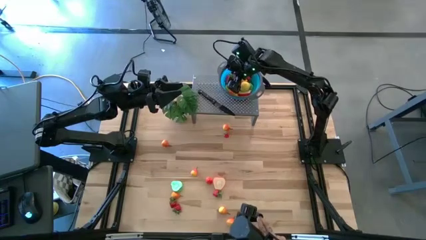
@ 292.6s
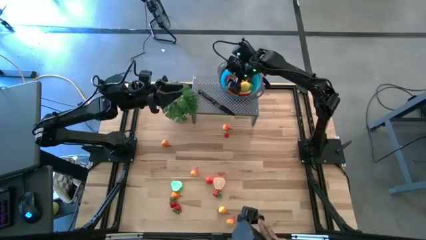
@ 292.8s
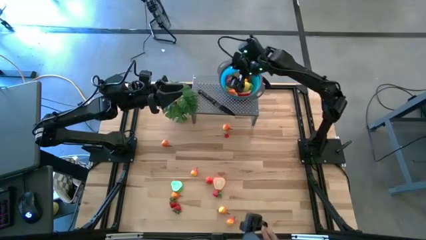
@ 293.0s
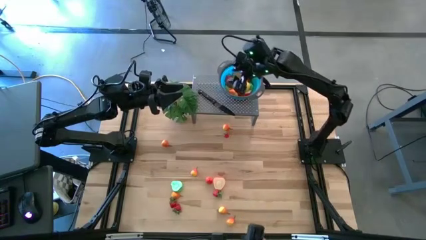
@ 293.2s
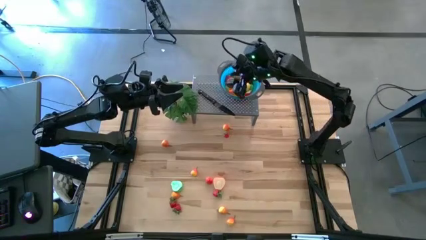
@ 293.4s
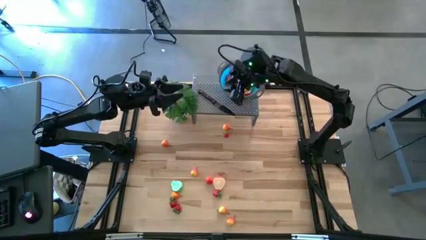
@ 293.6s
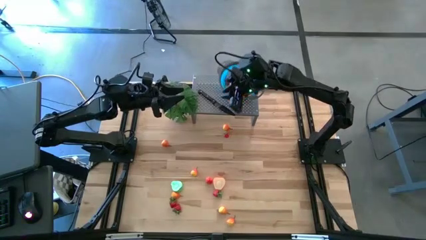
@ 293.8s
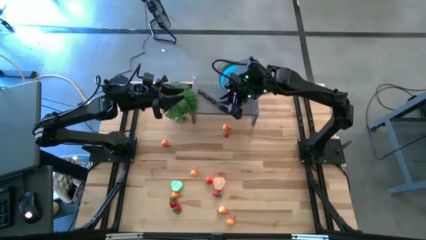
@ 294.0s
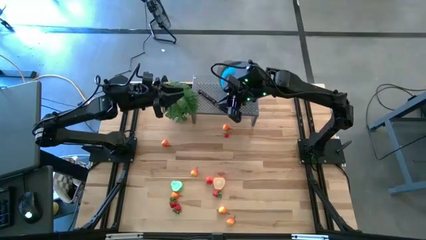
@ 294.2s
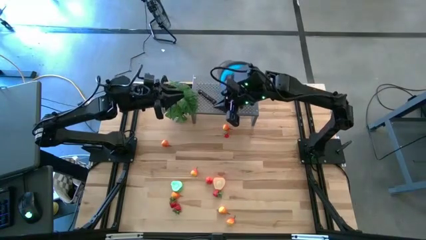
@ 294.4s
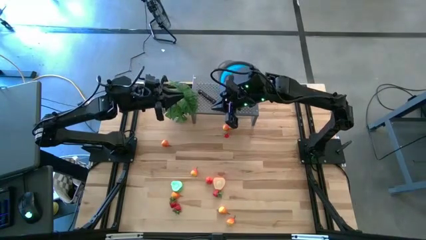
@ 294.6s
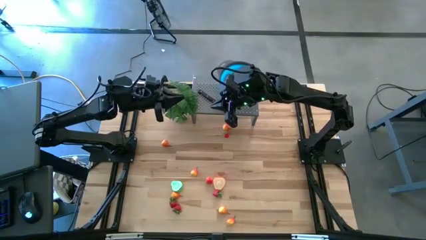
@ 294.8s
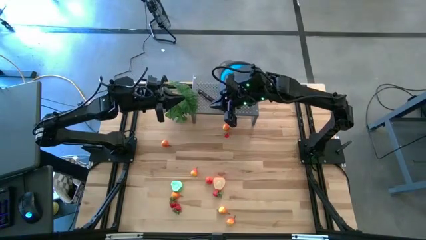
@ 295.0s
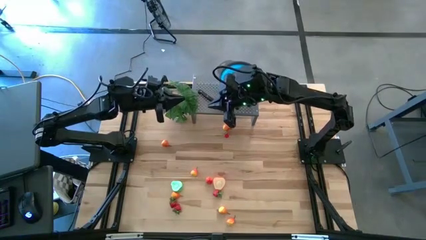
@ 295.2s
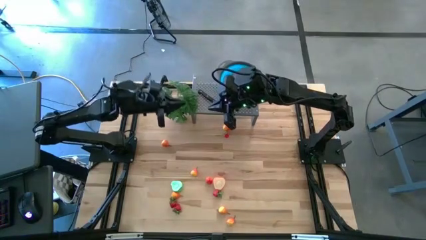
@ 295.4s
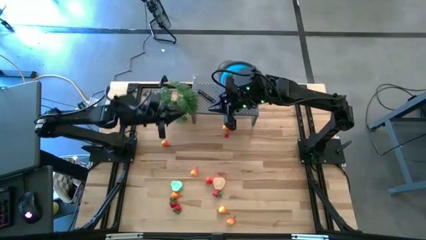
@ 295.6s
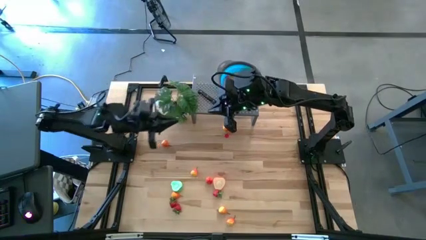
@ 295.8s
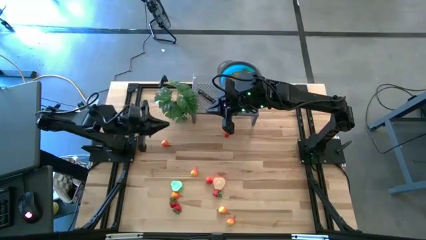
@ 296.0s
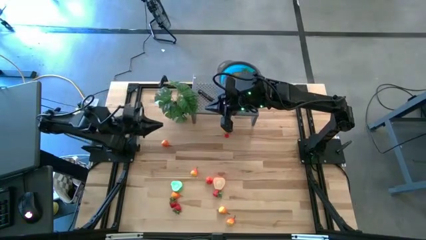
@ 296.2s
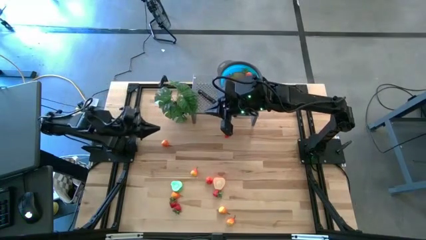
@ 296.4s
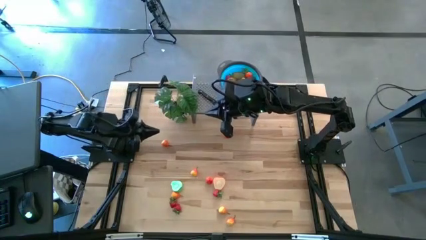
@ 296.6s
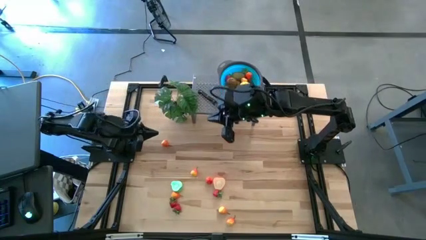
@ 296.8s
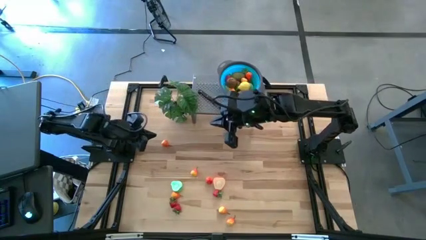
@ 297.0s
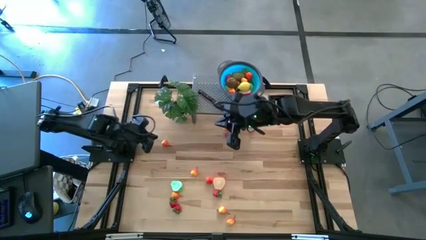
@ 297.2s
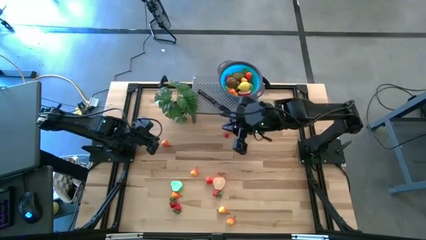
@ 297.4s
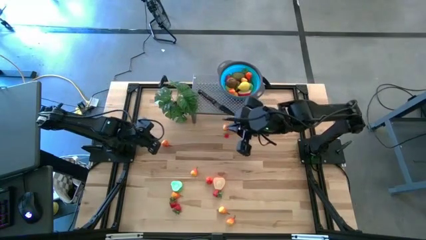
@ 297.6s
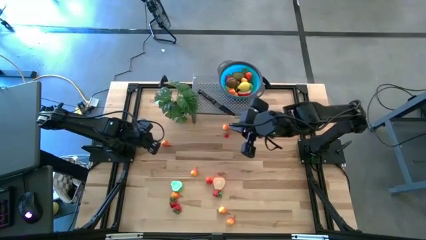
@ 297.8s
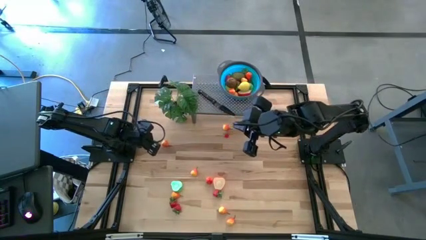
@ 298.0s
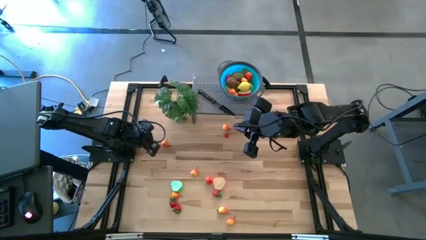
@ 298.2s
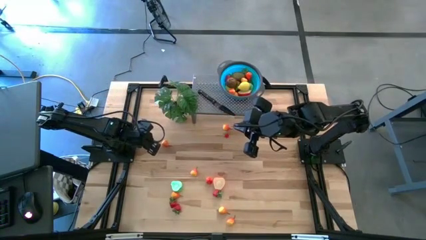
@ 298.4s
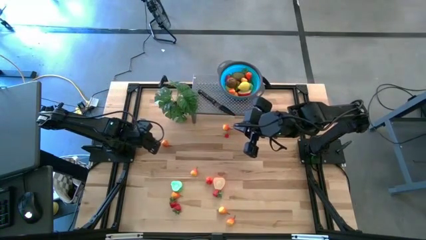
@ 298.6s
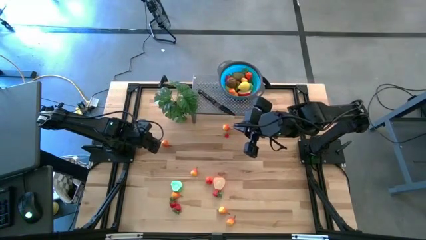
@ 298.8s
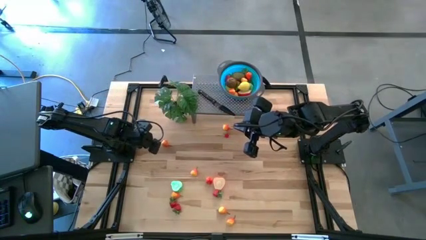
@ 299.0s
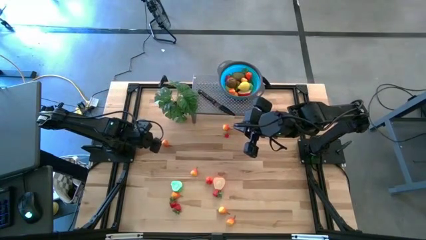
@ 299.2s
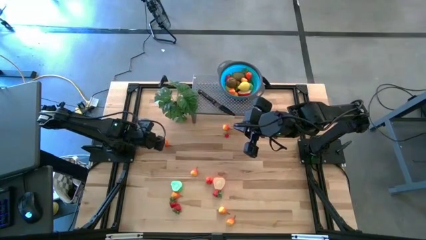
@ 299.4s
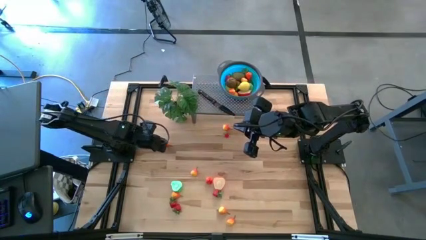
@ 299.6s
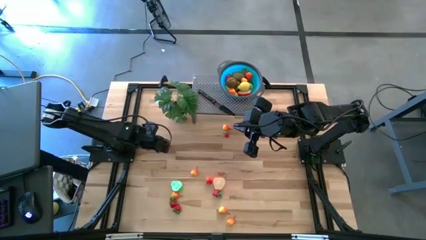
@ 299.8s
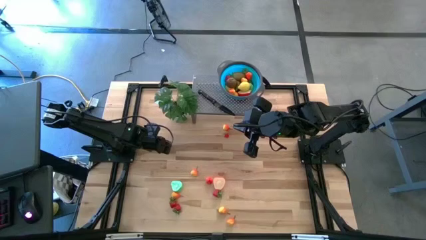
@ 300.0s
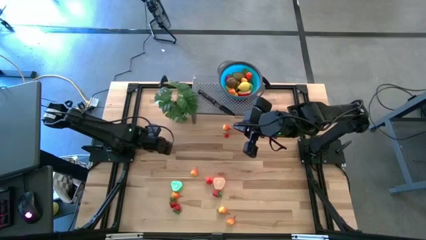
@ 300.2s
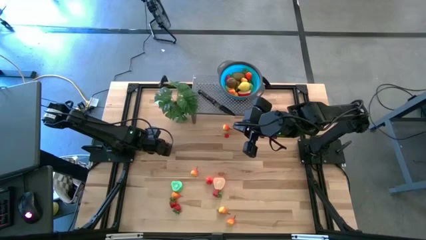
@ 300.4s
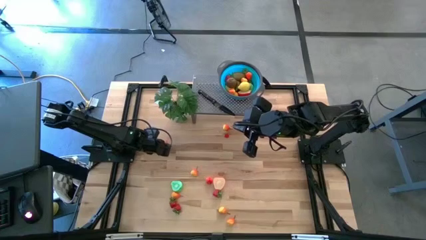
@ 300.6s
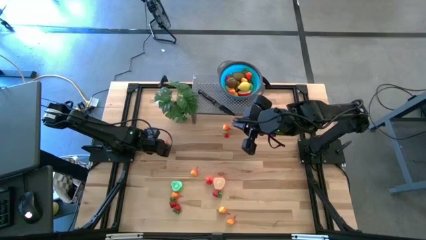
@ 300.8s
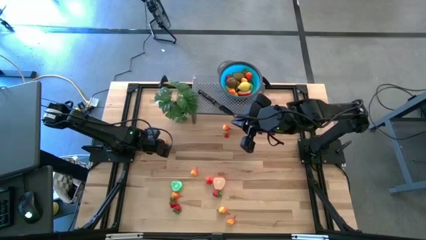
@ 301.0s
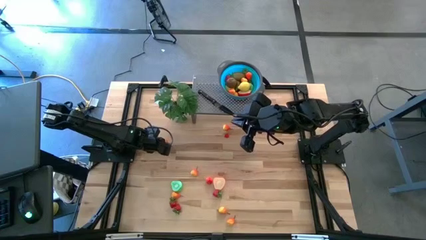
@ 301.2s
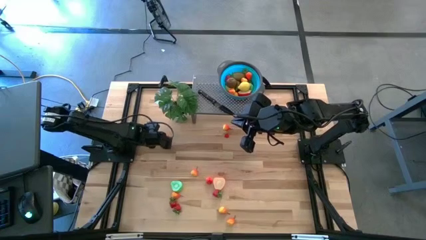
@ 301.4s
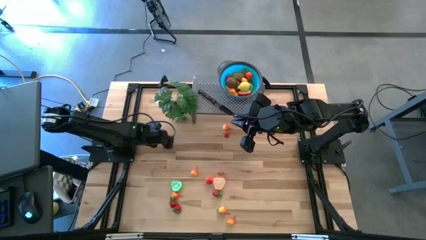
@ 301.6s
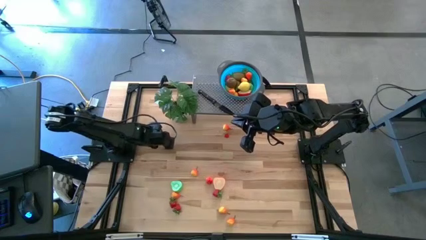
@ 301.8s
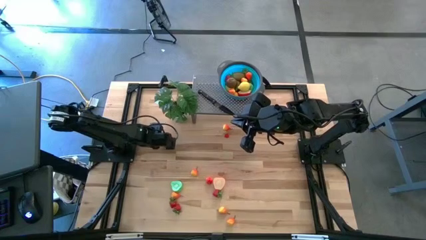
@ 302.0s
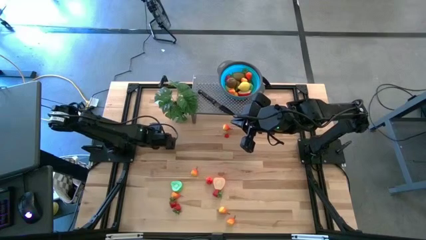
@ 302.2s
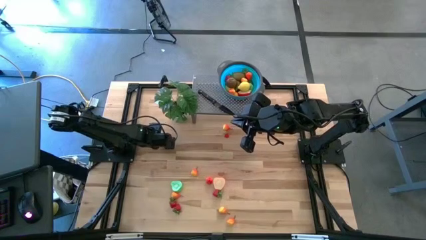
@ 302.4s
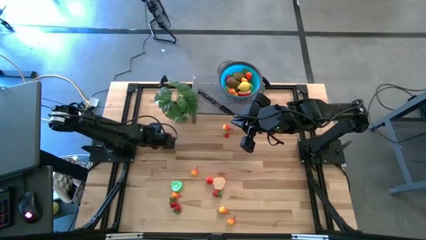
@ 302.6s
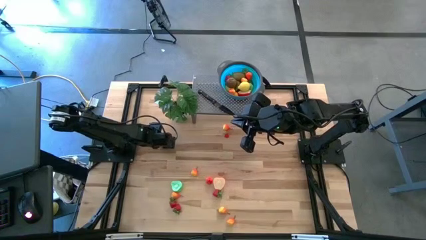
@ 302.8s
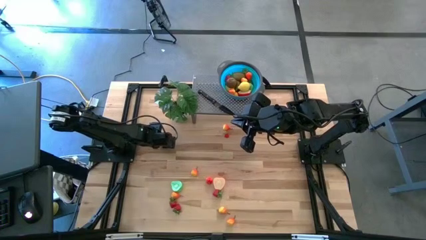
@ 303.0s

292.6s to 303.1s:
Task: Pick & Place Fruit
Put the yellow pear in the blue bowl on the shelf

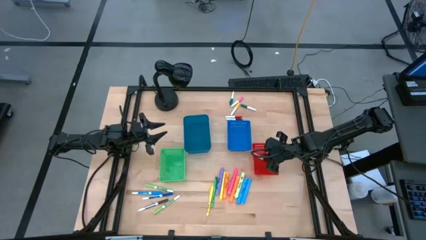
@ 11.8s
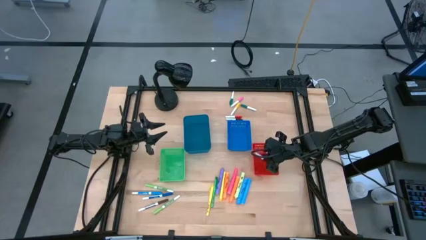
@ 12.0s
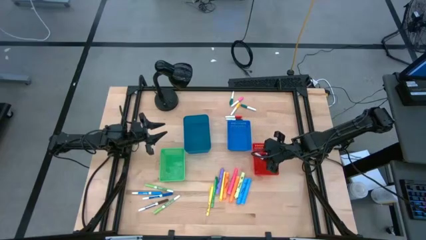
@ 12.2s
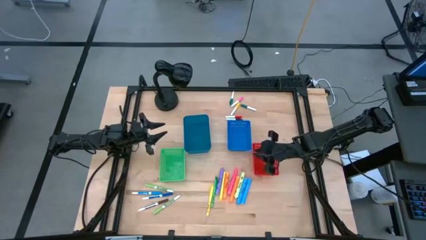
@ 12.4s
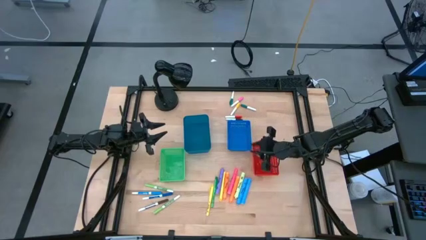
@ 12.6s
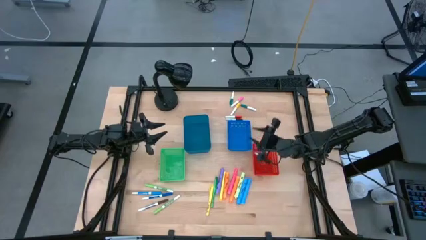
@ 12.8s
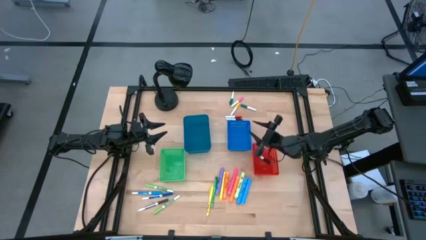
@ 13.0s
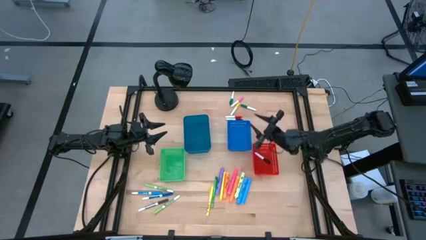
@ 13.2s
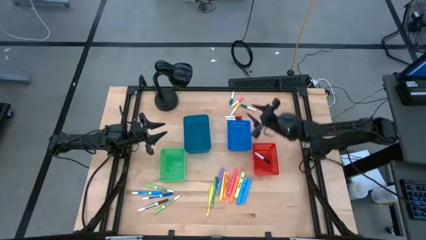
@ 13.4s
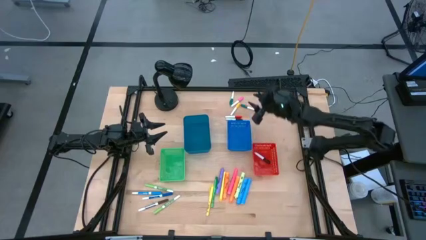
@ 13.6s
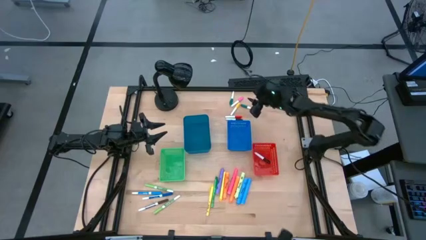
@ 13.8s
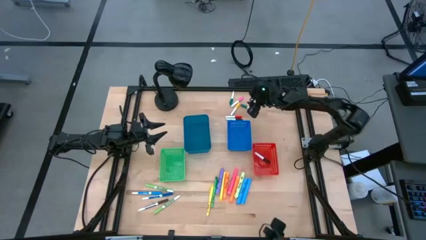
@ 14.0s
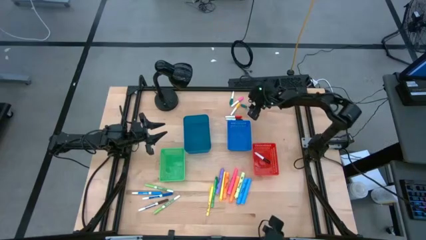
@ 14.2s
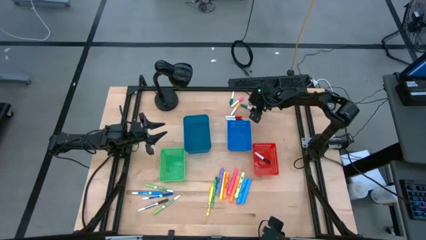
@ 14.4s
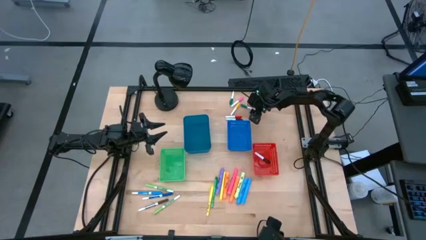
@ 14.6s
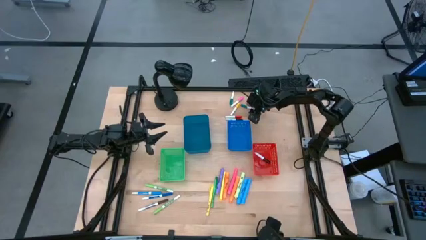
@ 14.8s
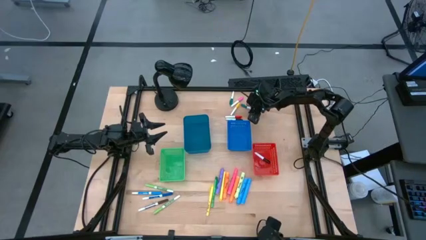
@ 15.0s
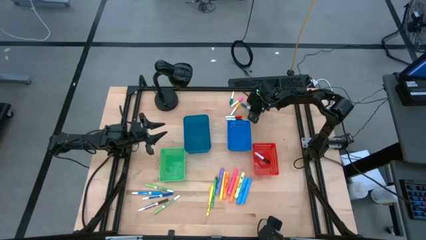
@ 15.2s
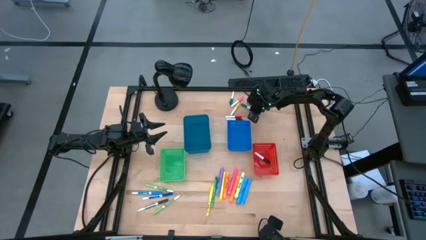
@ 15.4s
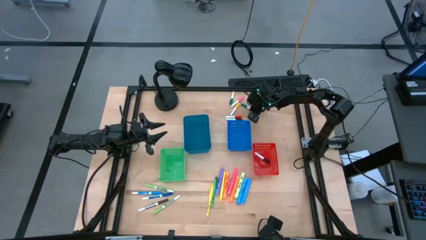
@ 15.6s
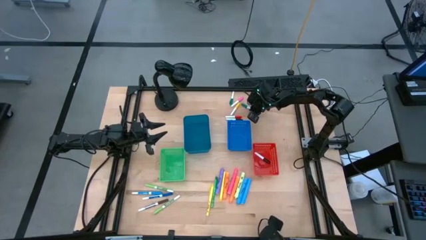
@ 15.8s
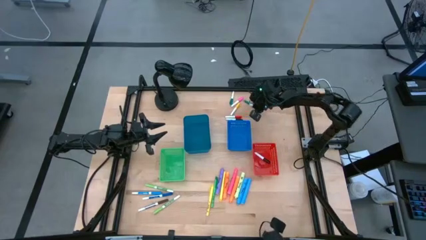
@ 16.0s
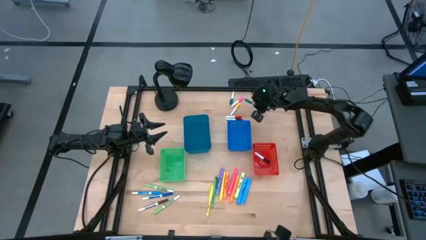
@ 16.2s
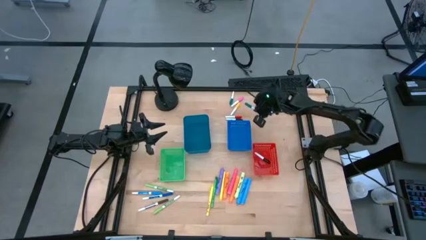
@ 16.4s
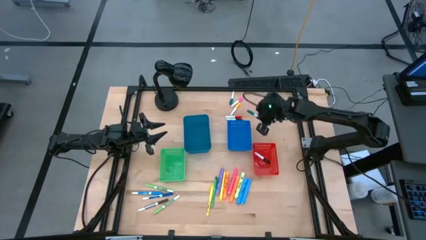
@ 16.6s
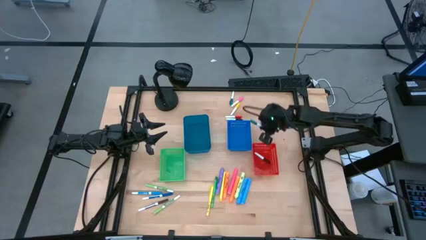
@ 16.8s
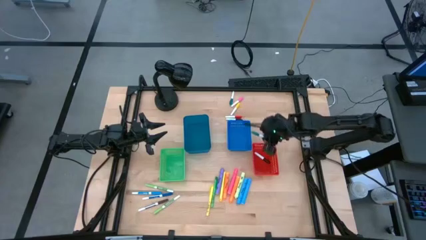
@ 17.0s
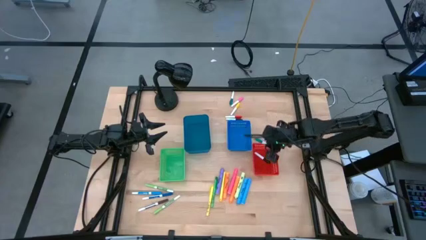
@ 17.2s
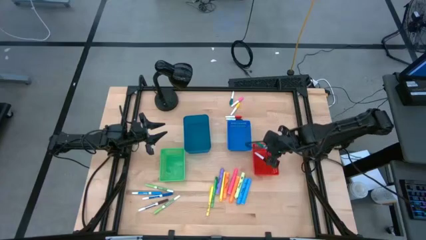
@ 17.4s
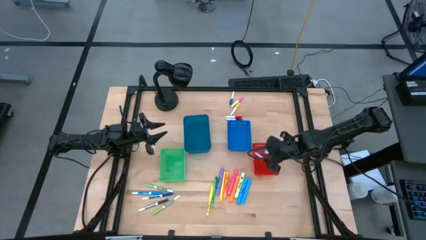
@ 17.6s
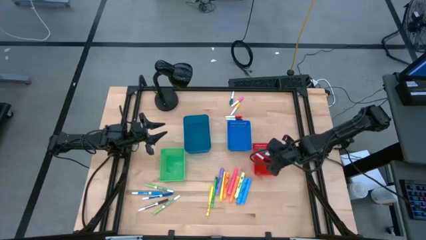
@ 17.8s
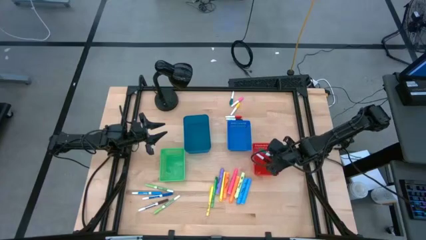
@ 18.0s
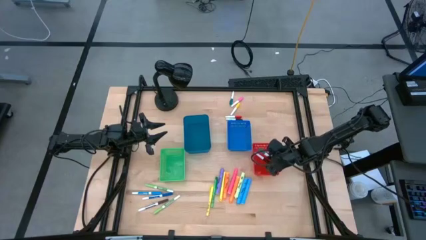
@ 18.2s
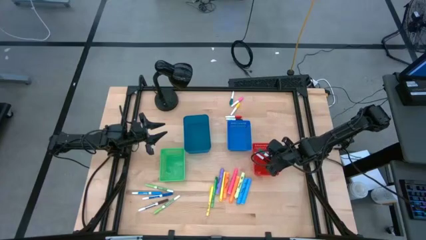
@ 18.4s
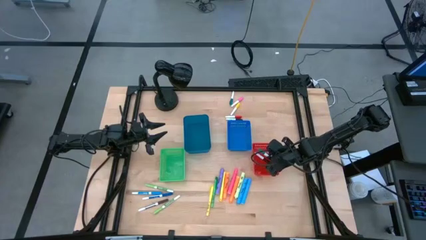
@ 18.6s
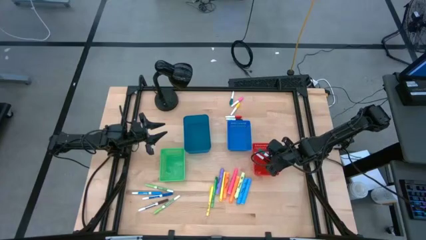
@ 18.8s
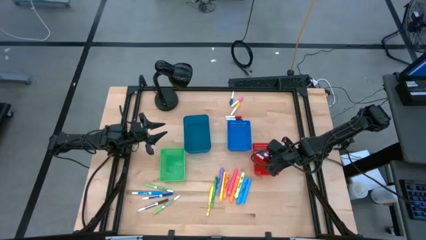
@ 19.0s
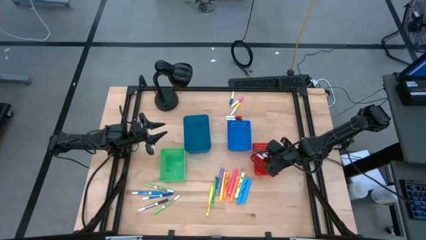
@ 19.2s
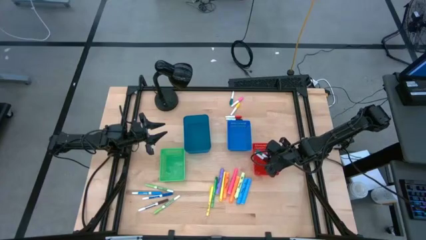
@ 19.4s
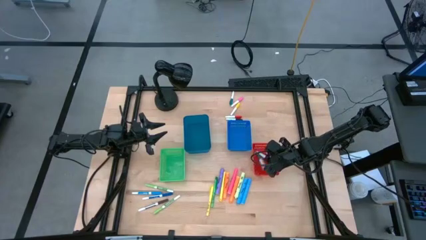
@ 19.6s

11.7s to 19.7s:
Task: Pick & Place Markers
Put the right green highlighter pen into the red bin
